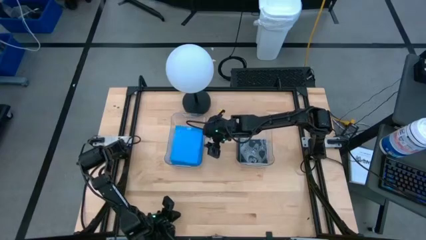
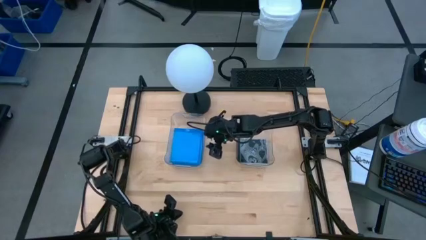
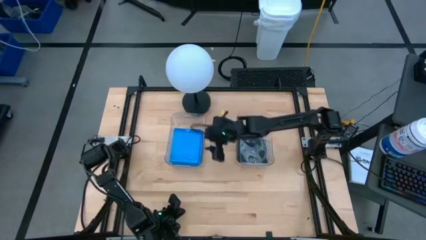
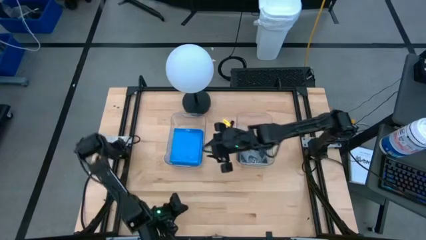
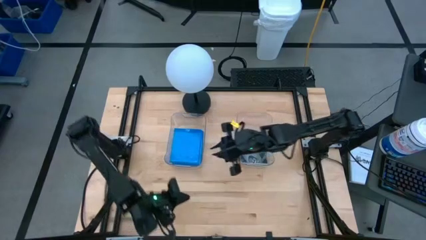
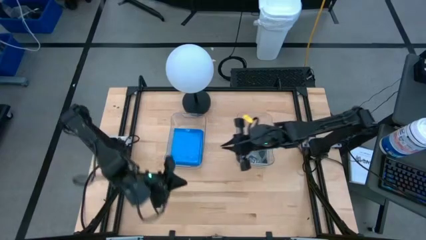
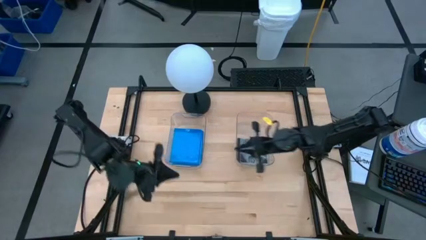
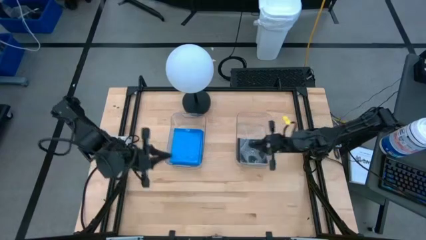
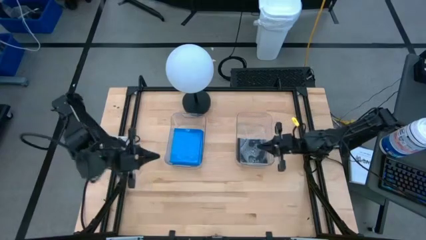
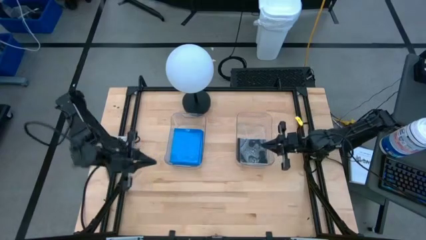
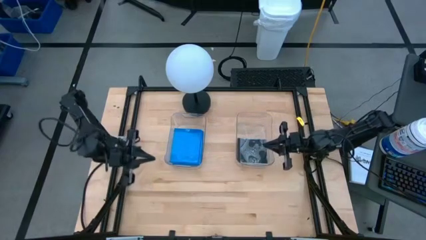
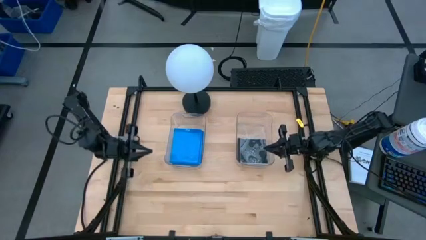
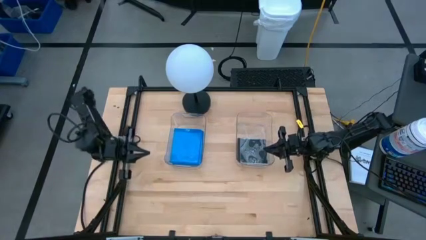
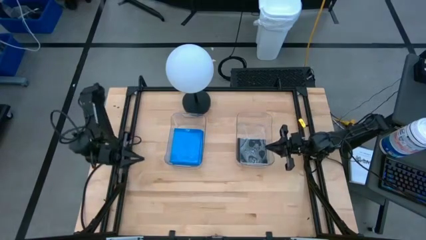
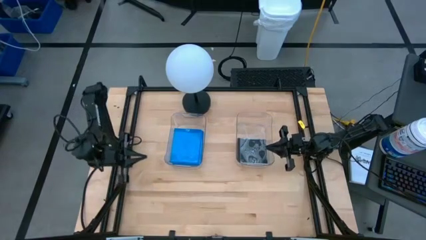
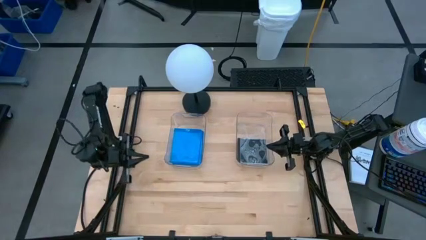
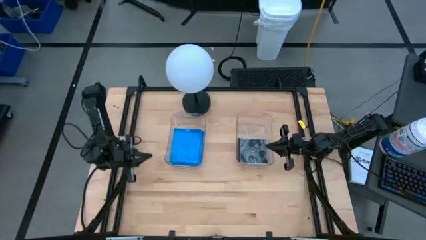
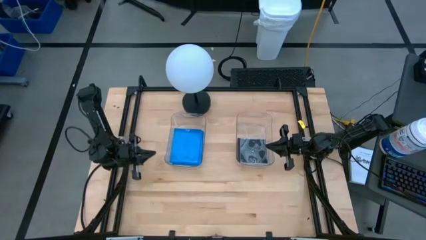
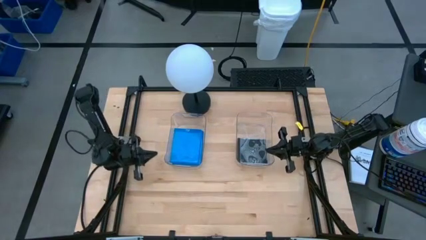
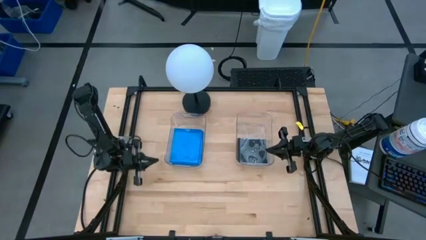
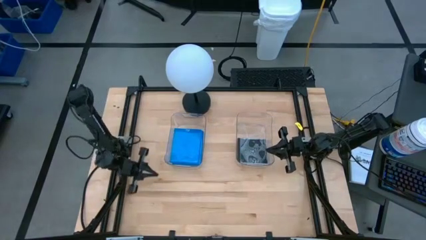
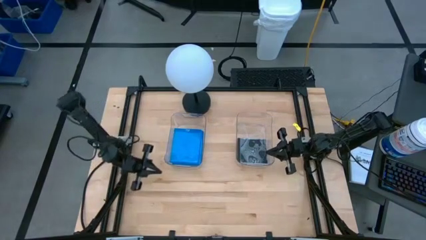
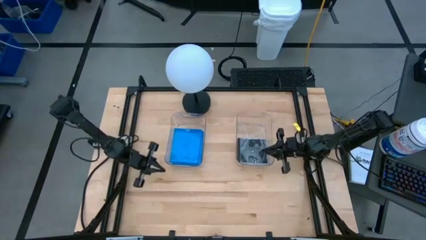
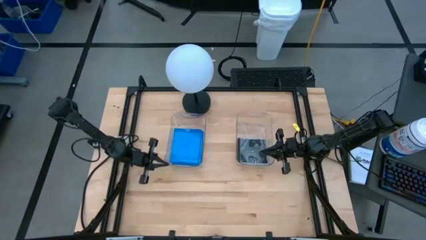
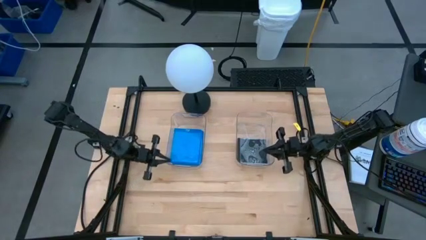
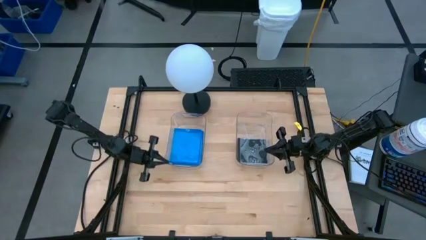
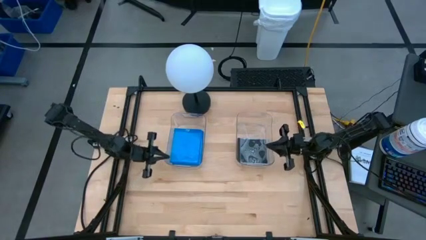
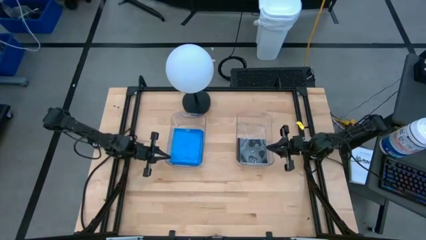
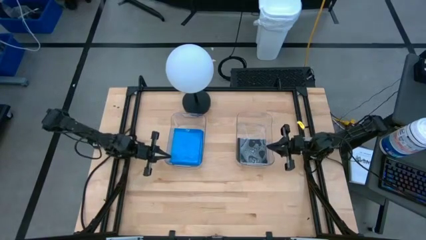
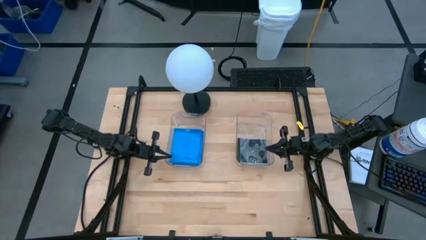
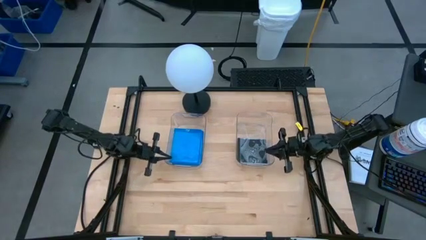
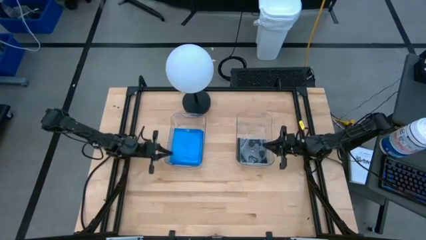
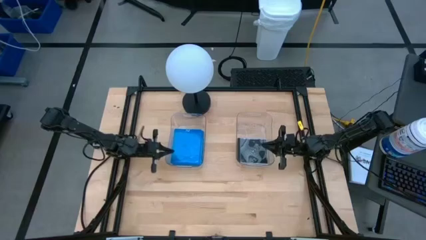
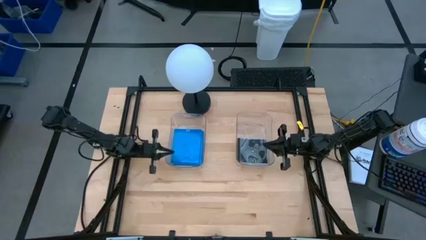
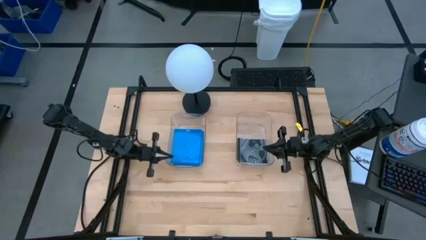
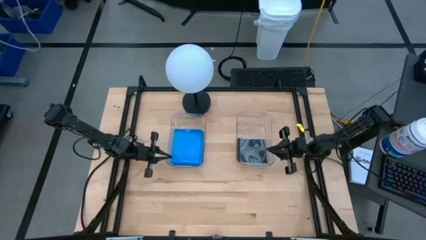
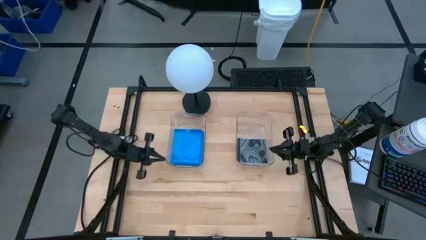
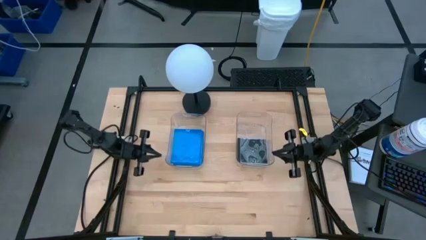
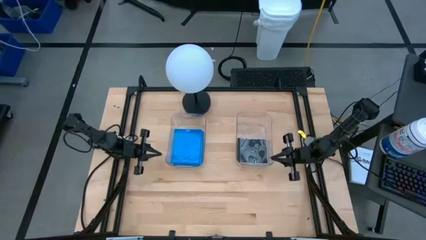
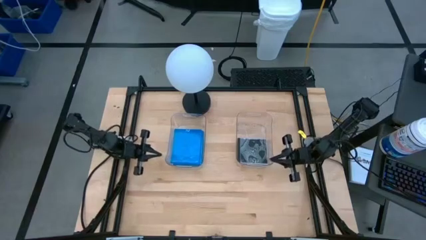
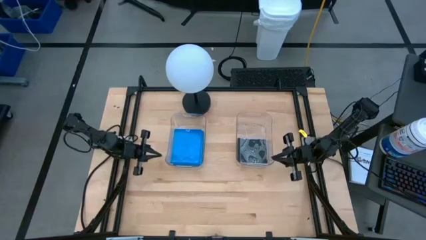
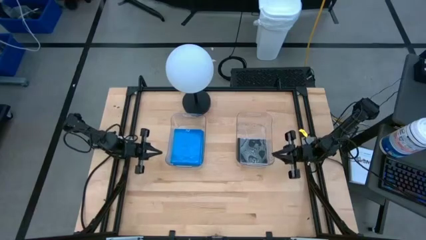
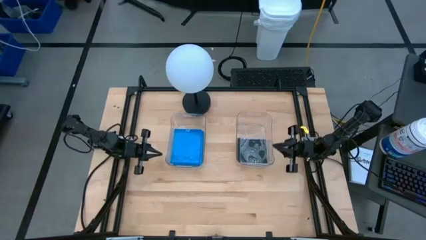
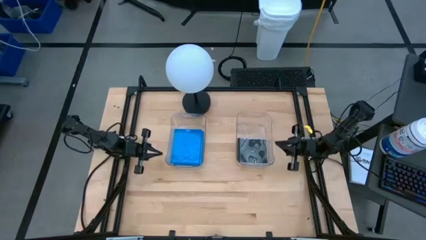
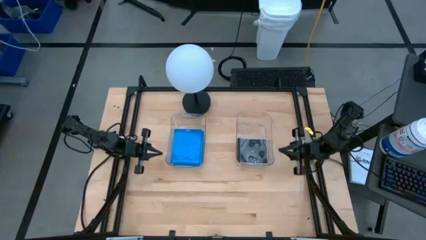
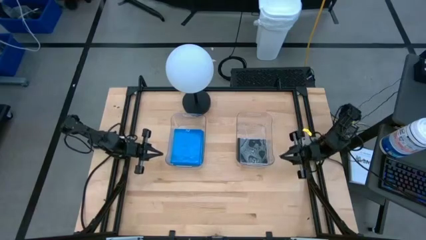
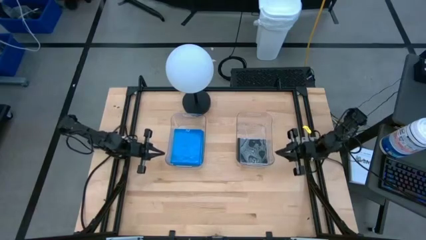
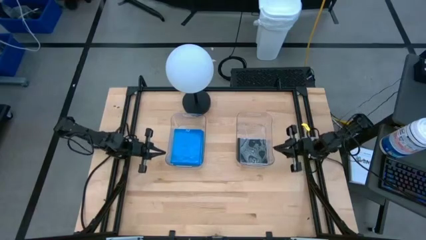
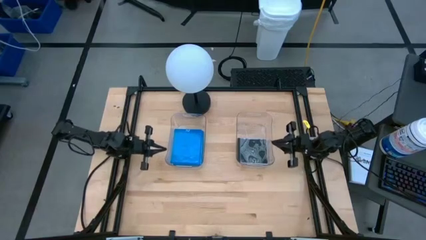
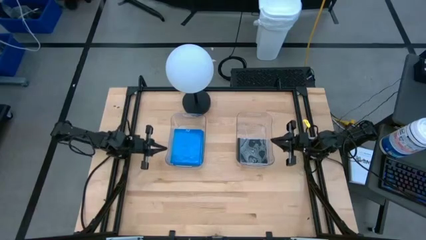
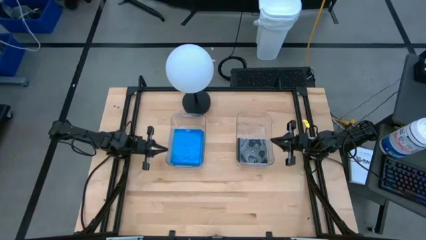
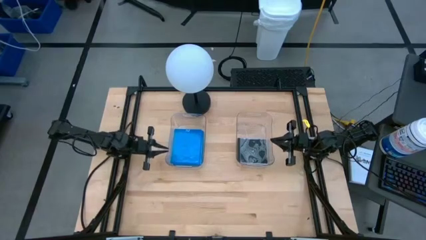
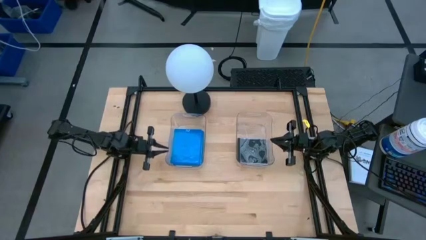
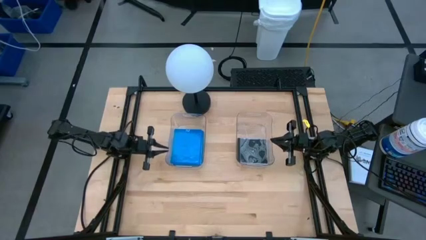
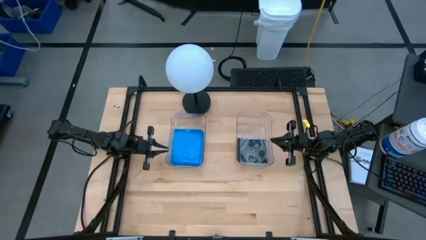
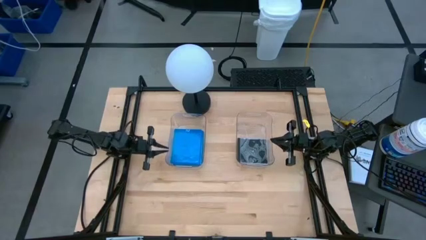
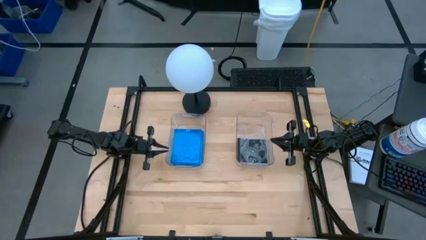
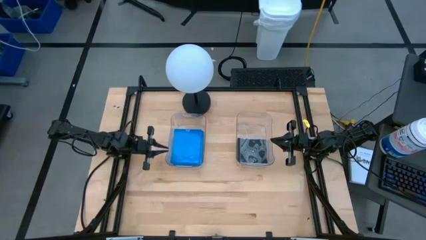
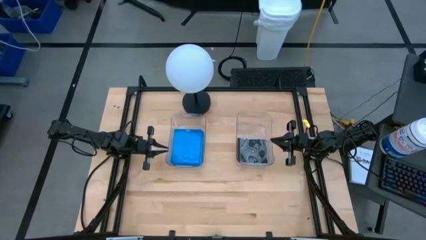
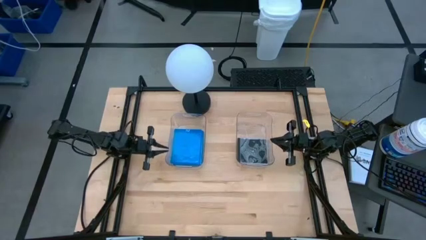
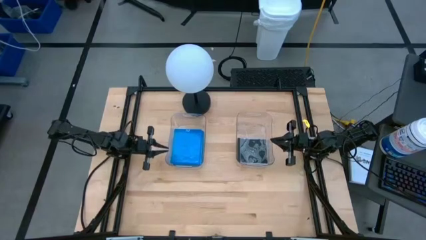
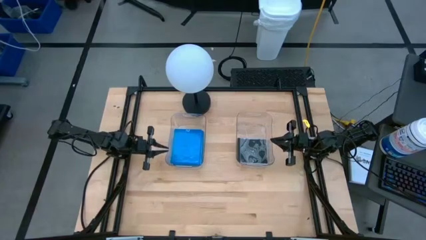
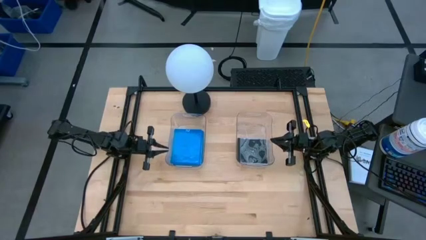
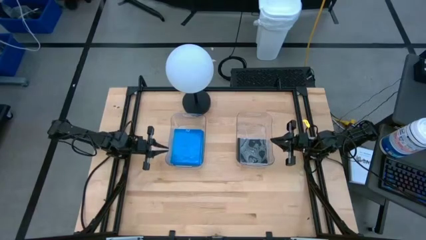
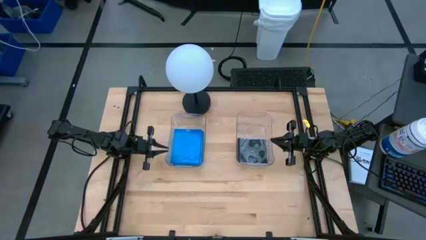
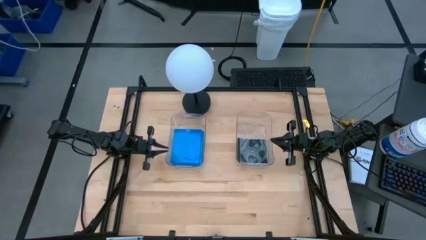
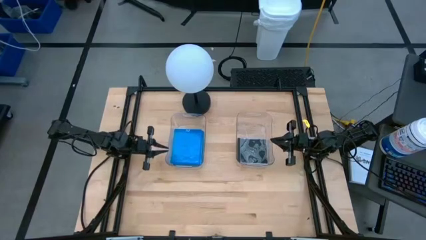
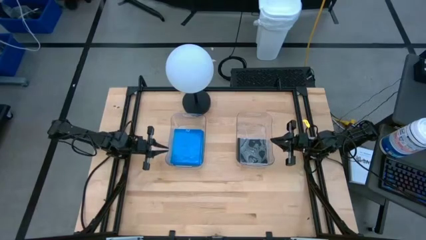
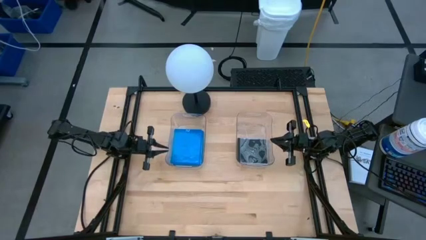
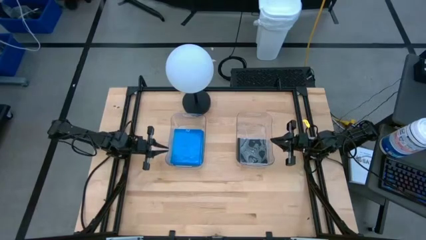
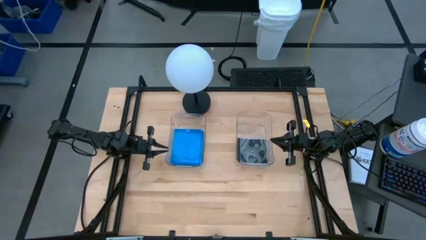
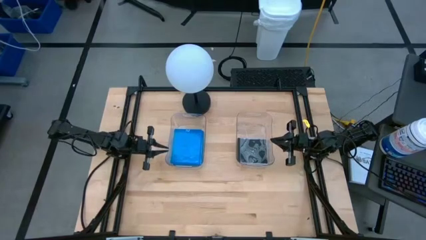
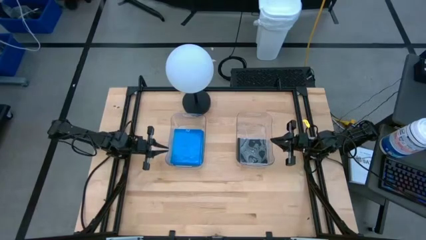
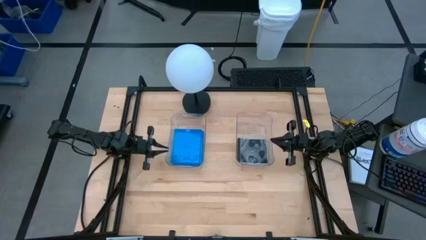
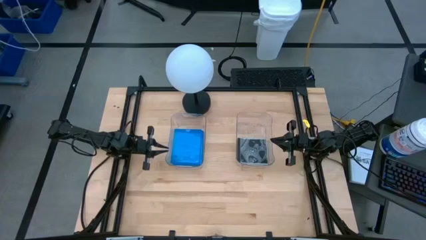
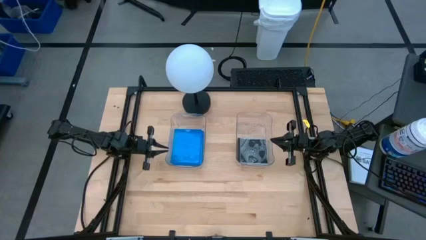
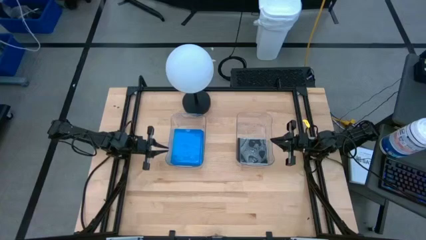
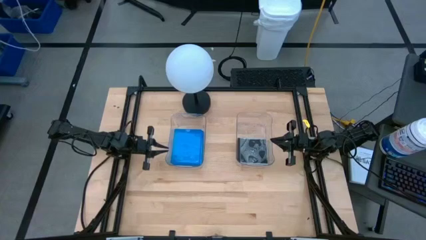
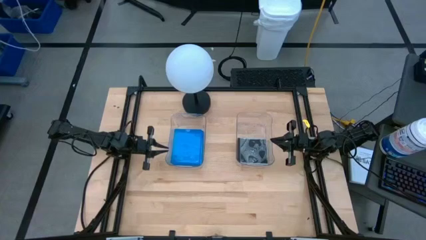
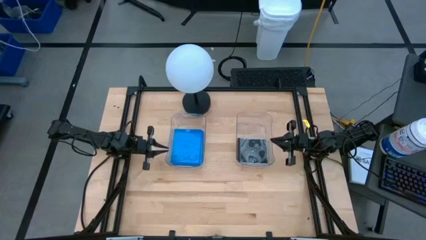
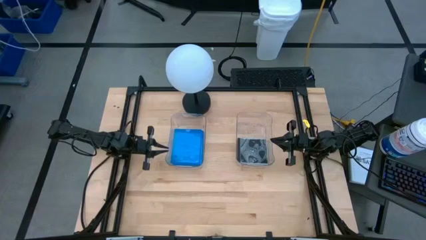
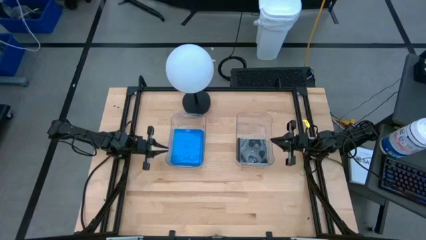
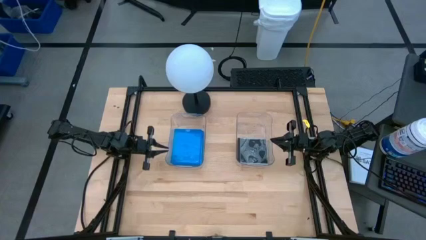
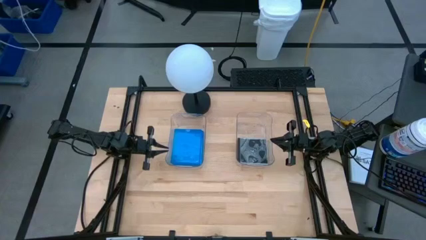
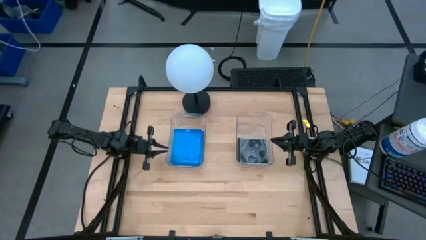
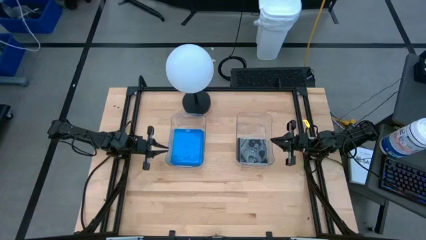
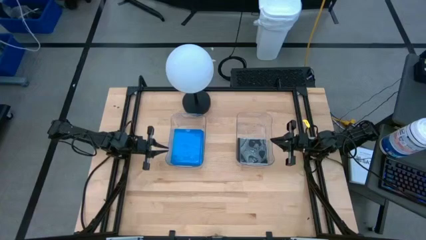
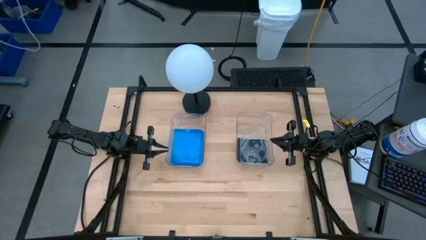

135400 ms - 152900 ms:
Task: Pick & place jewel cases by type
Return to Home Position
